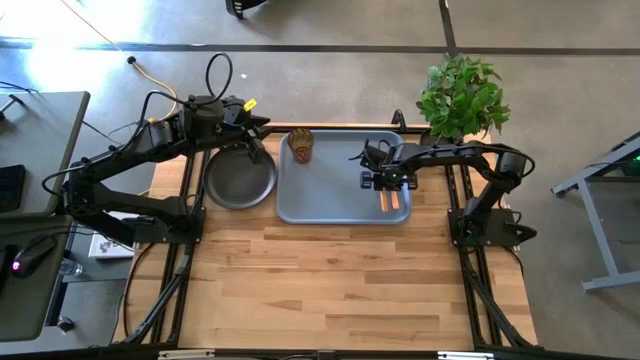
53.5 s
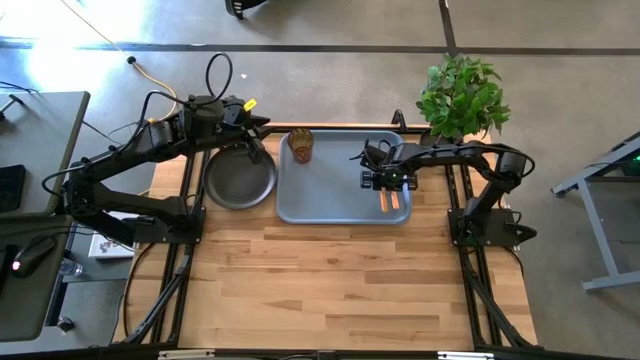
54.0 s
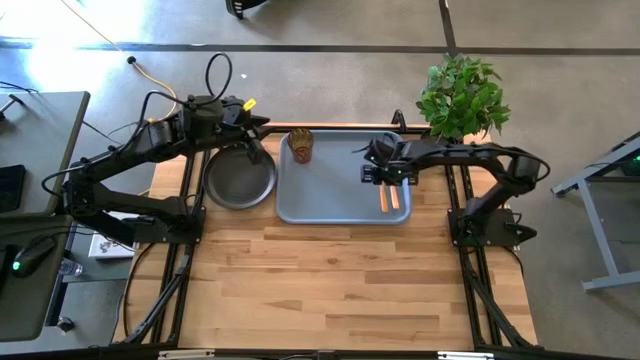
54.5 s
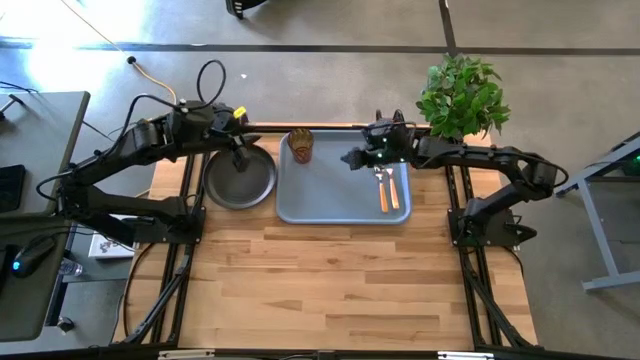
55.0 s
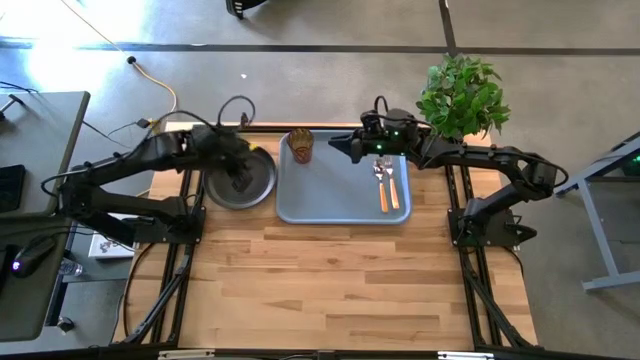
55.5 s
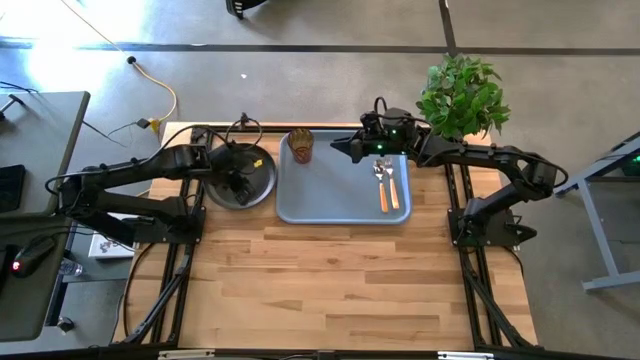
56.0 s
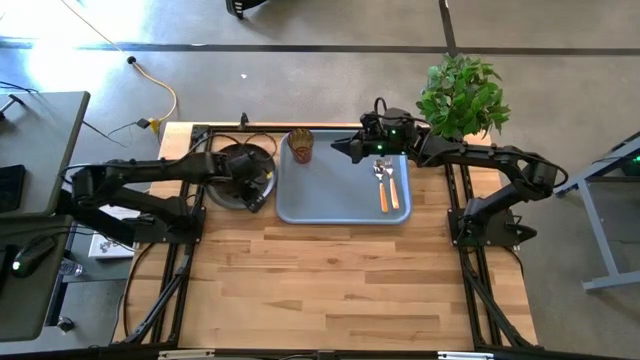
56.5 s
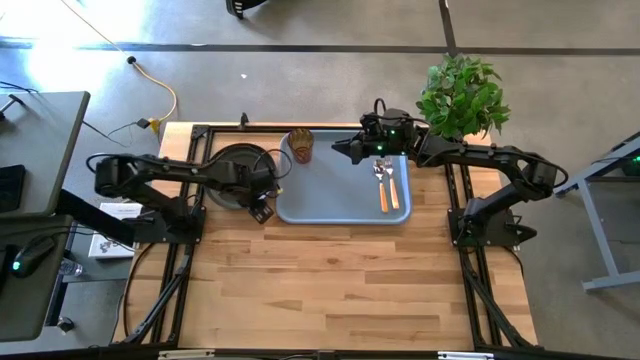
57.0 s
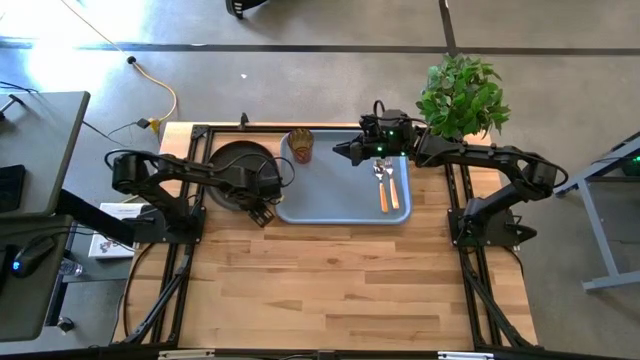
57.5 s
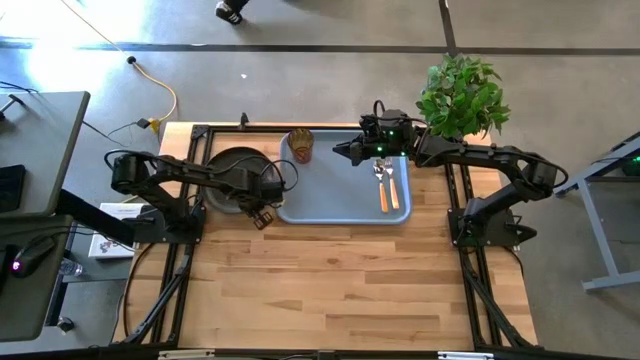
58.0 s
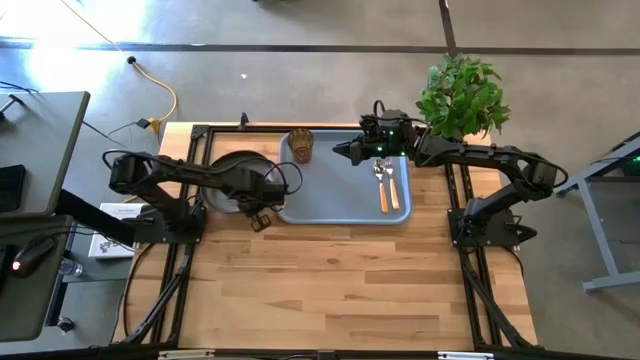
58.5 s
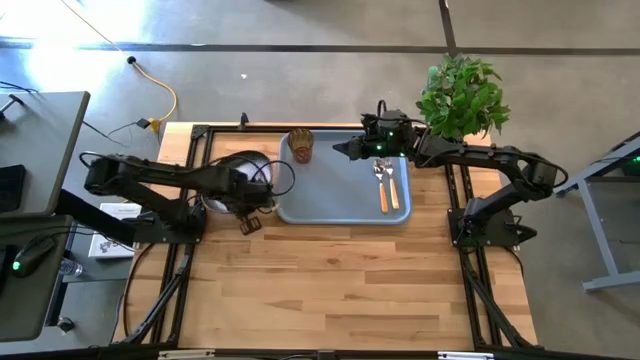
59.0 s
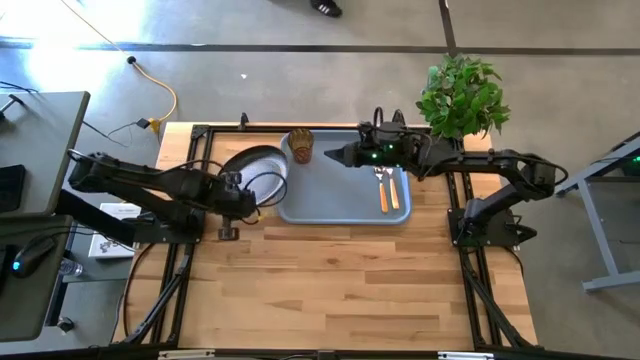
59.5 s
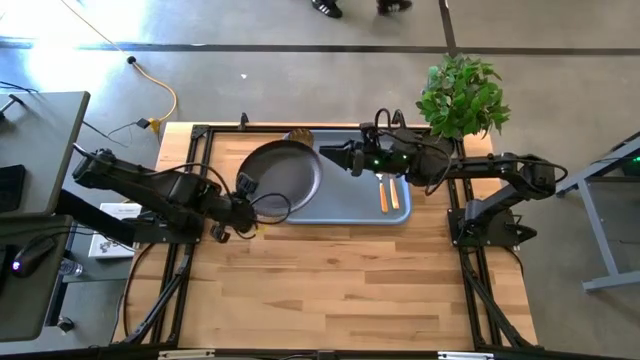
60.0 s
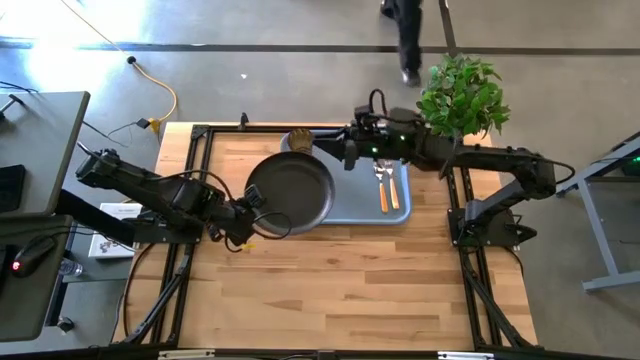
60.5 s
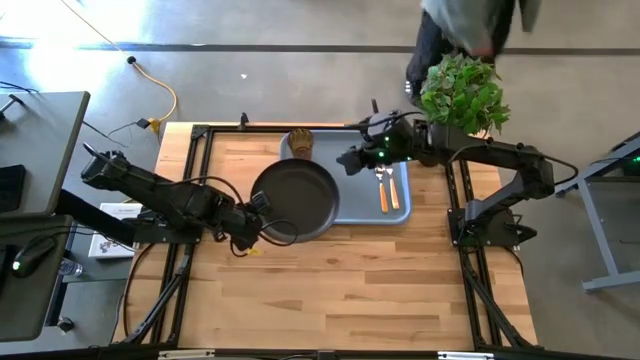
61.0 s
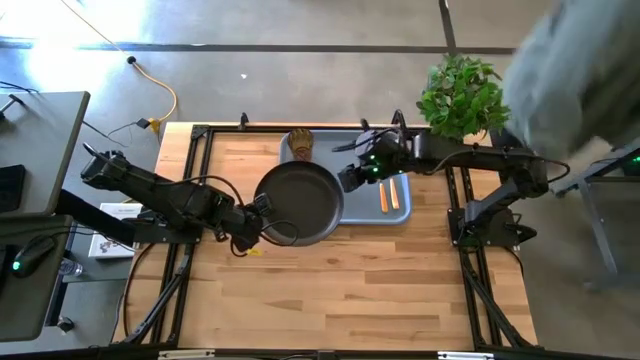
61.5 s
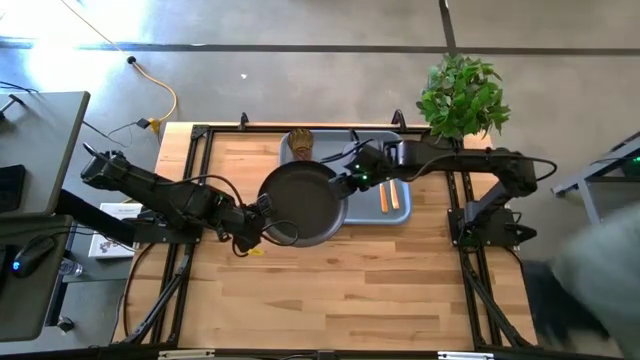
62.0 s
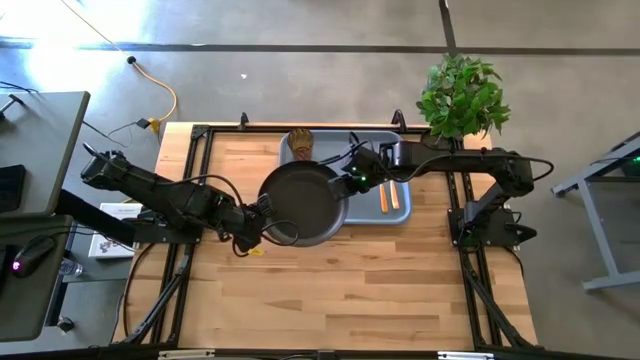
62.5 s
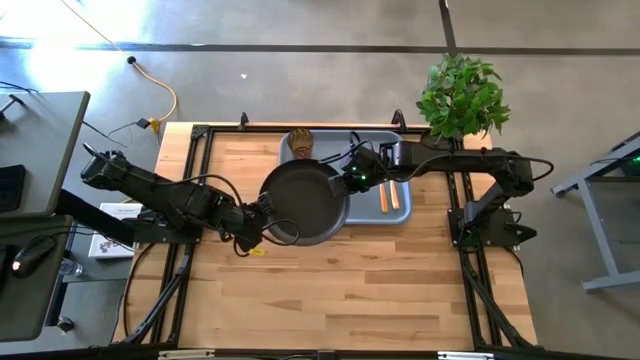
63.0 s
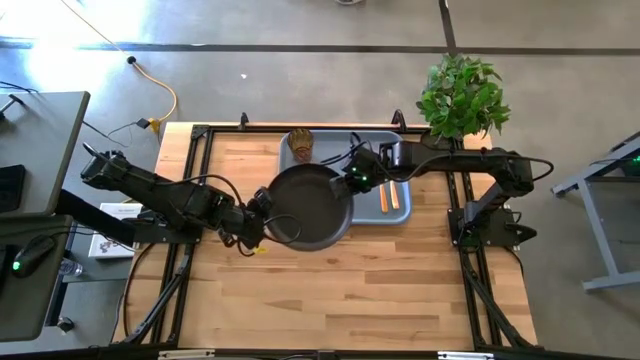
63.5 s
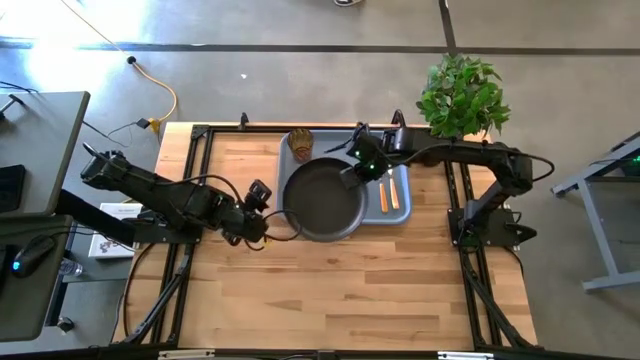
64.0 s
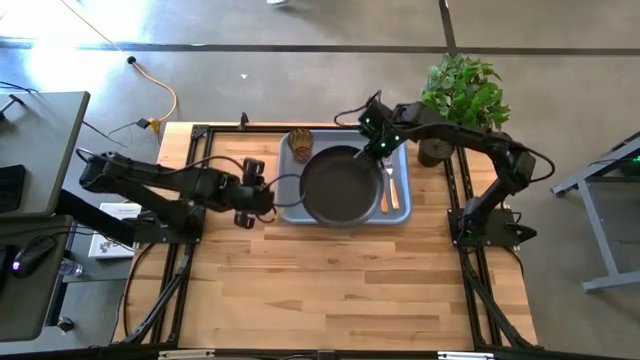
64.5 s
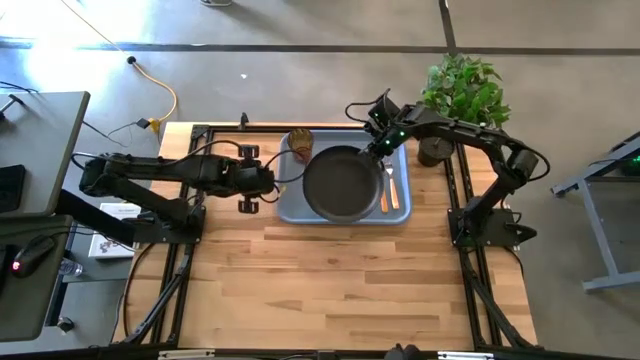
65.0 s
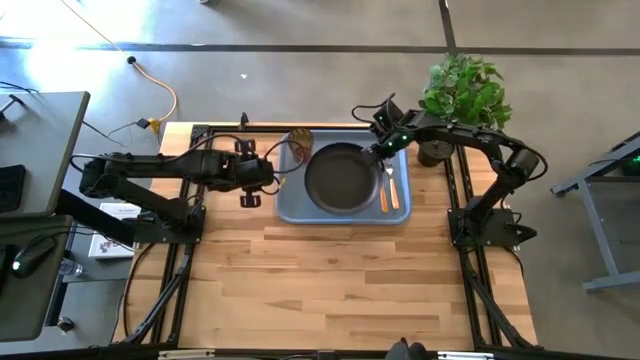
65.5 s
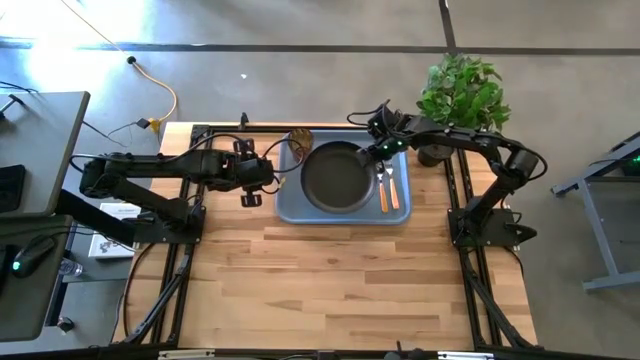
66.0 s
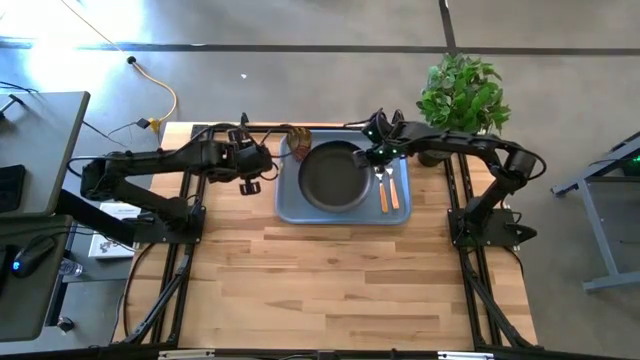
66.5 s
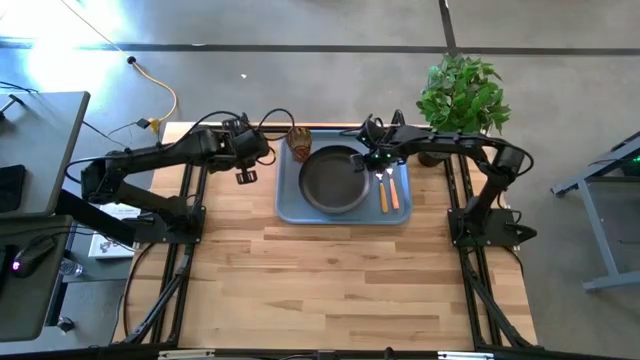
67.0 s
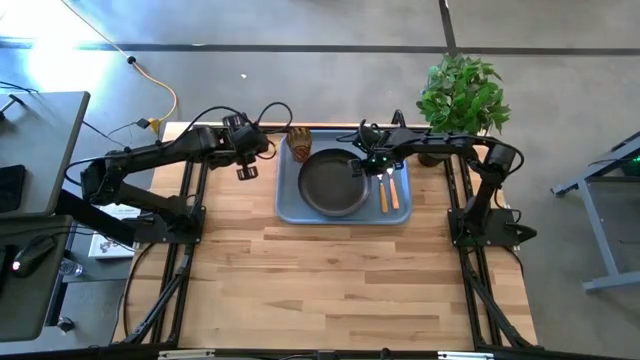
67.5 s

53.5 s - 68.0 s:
Task: Pick and place plate/cup/fork/spoon on tray
Put the black plate on the gray serving tray

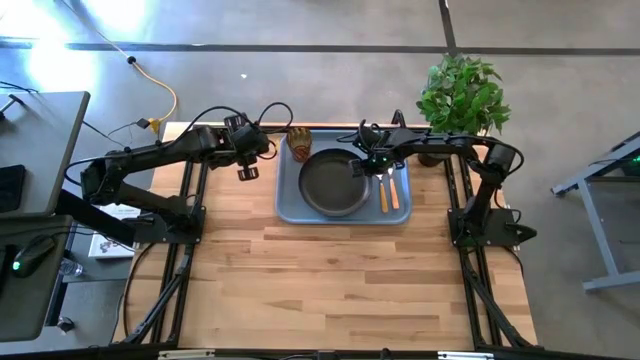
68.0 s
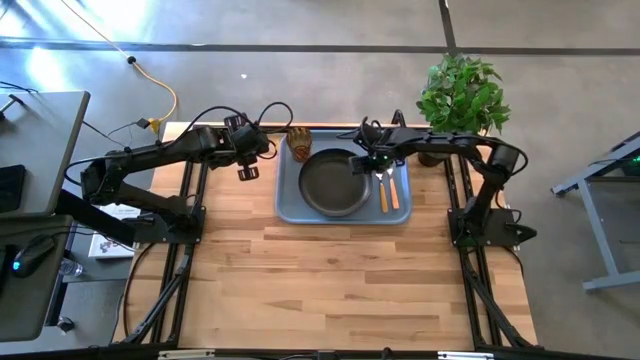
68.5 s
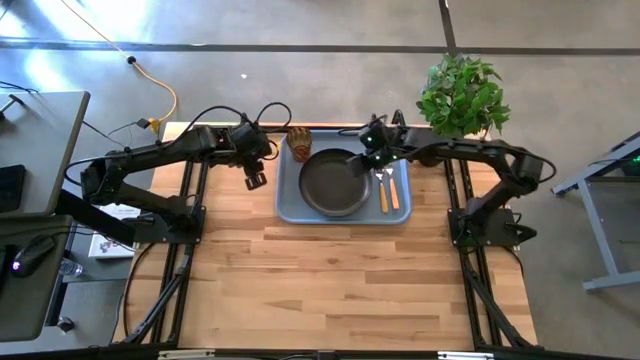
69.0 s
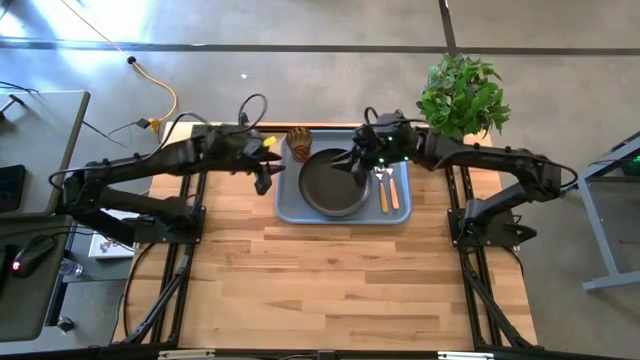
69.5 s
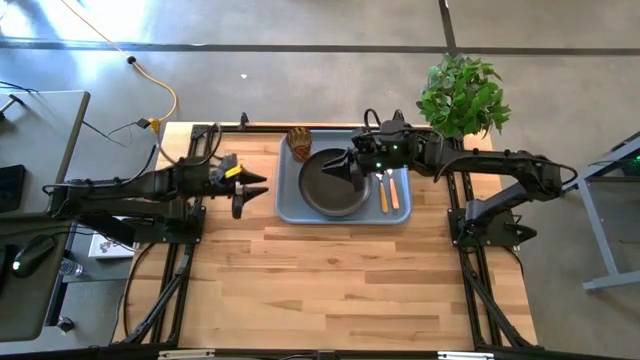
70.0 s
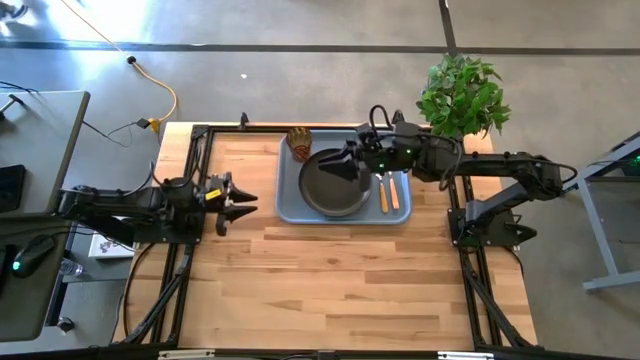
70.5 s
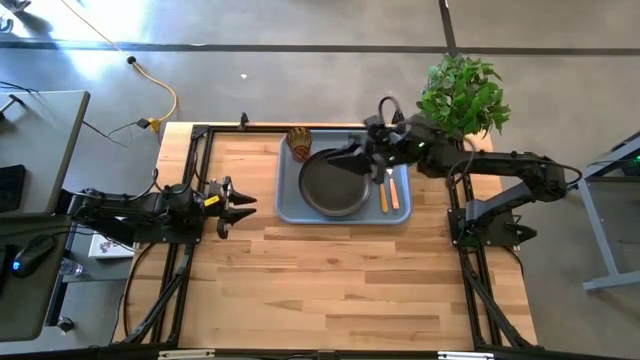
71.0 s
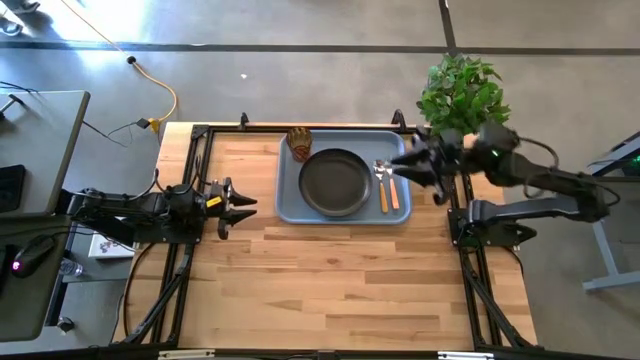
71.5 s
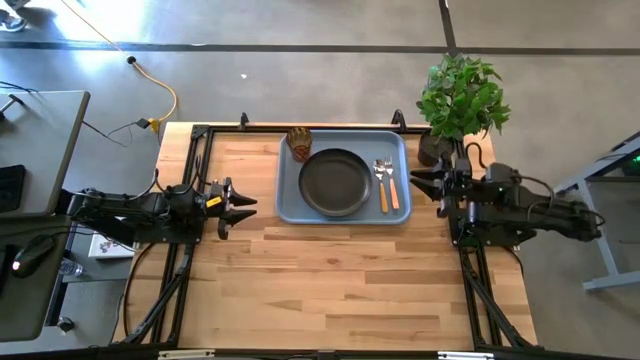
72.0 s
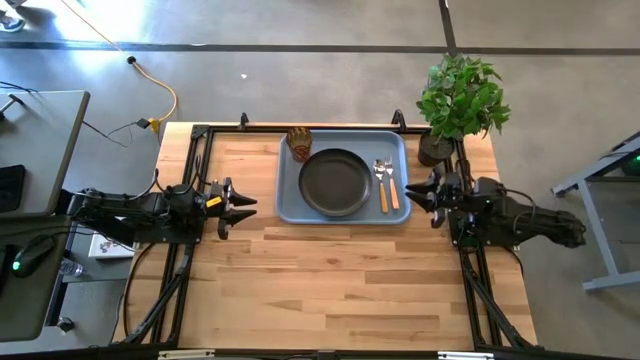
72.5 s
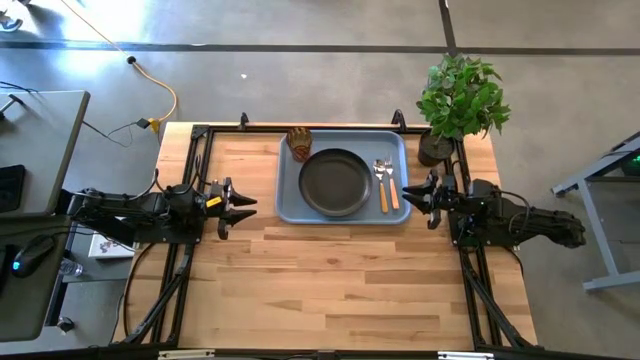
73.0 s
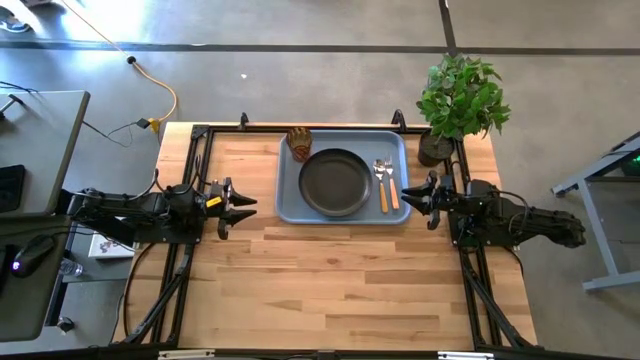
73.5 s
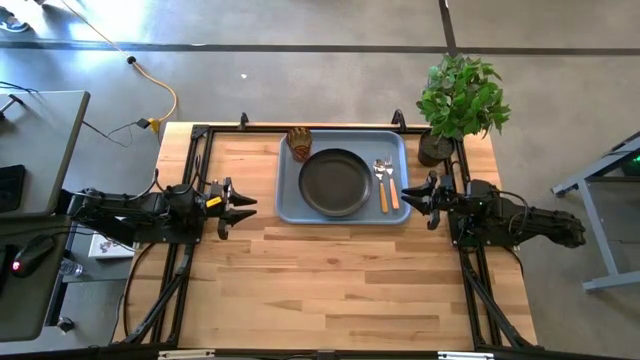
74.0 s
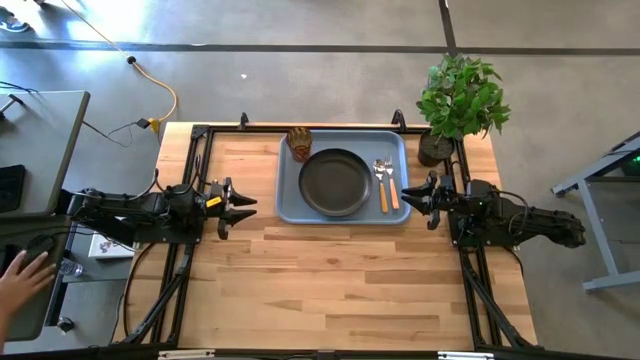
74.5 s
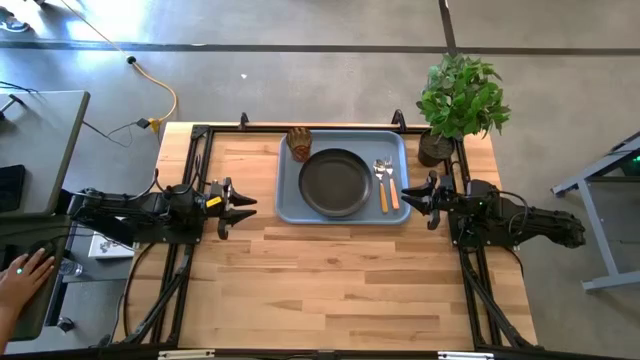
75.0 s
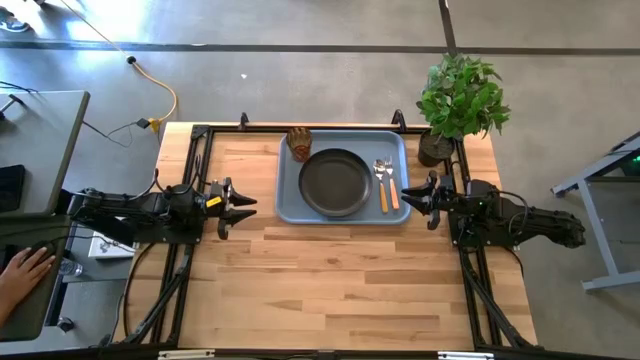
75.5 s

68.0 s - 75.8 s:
Return to Home Position
